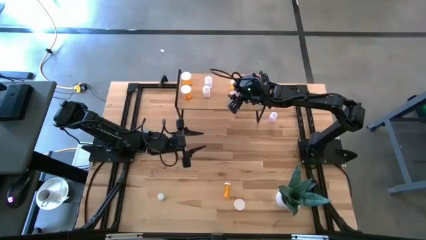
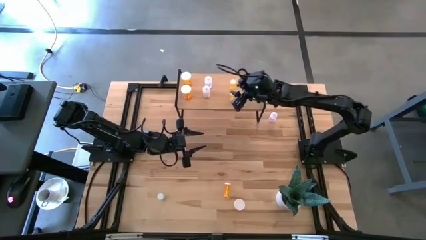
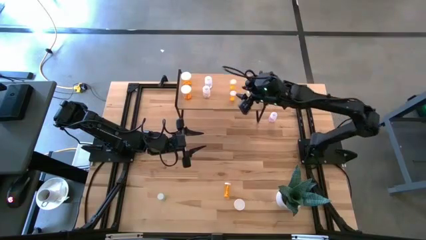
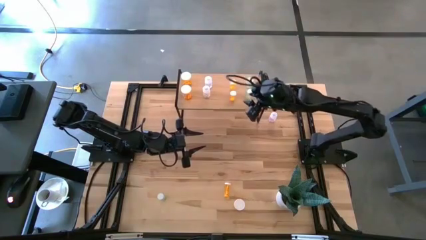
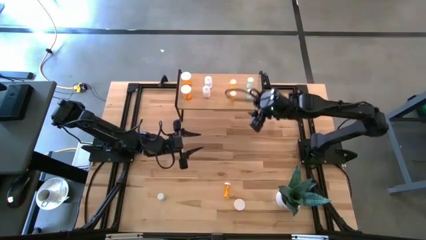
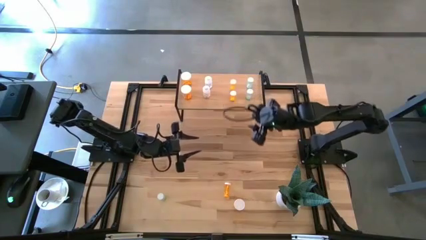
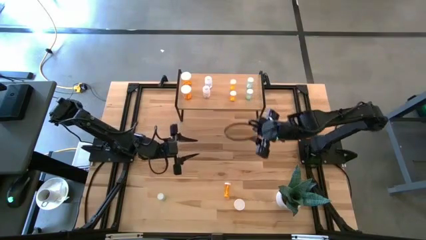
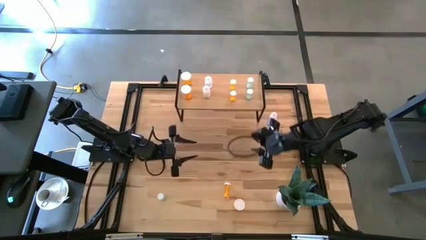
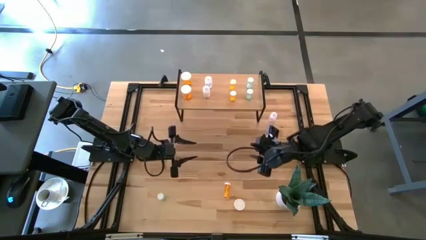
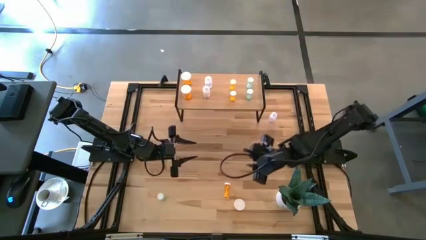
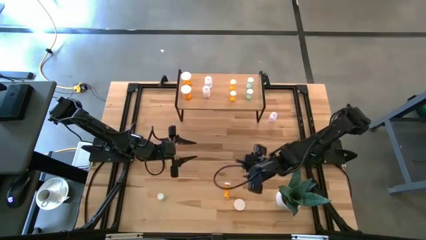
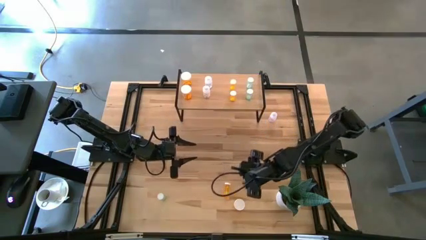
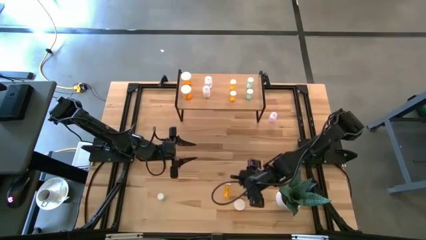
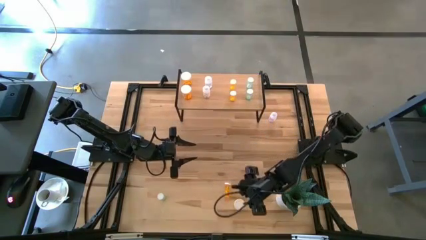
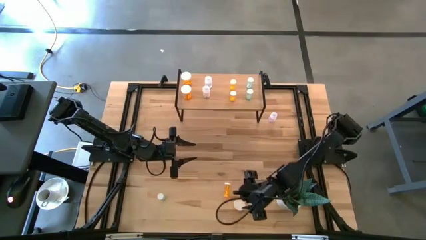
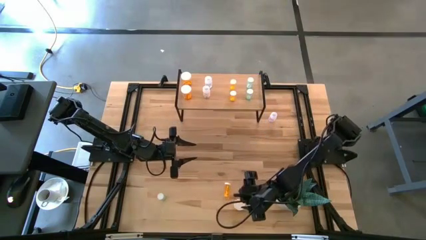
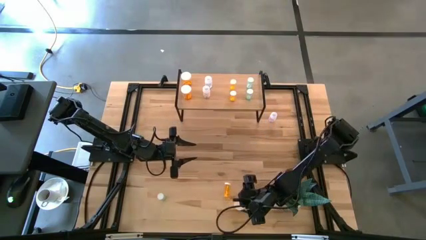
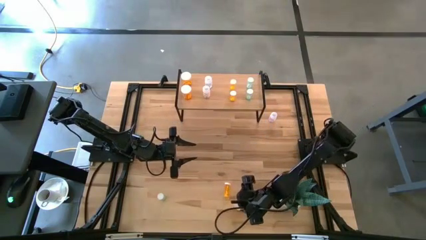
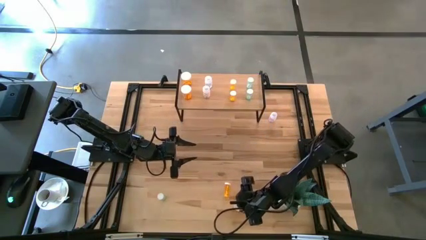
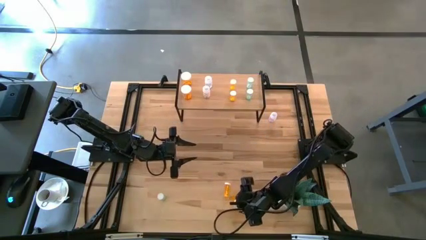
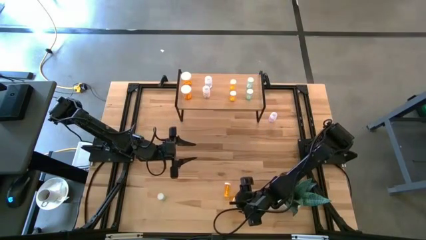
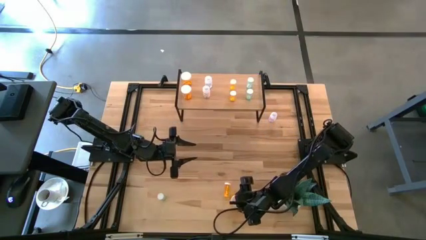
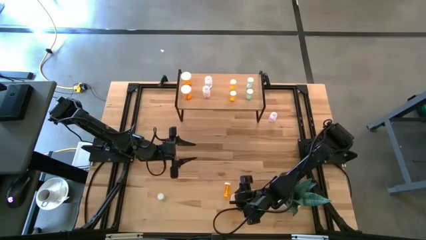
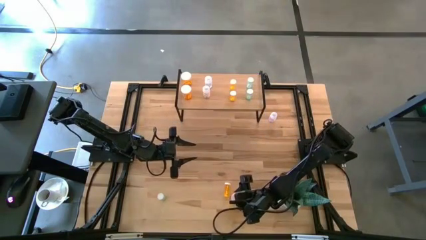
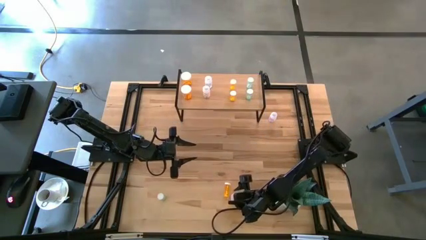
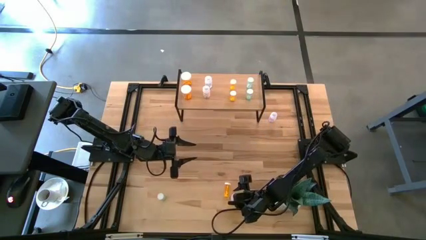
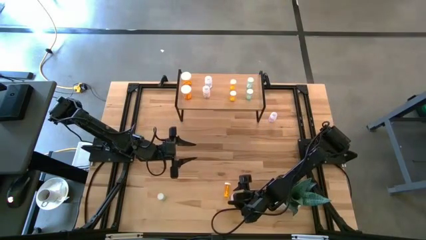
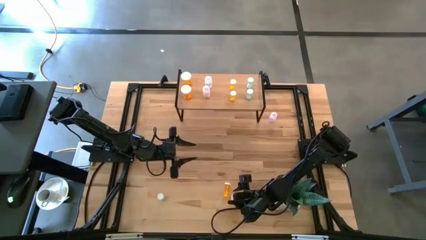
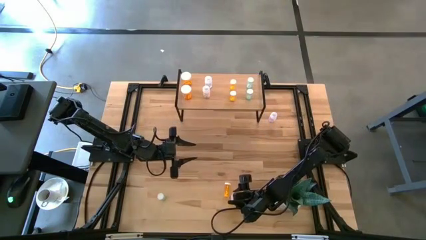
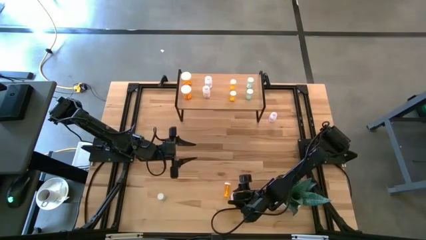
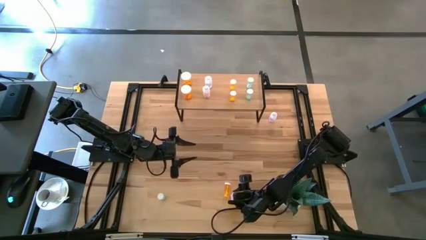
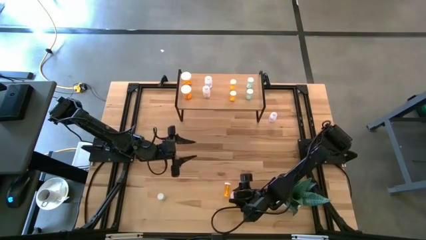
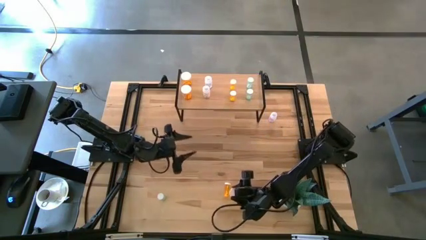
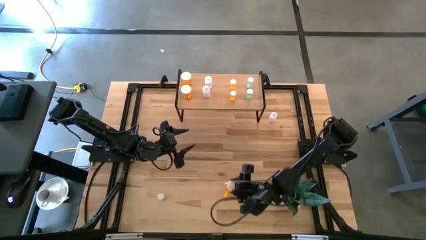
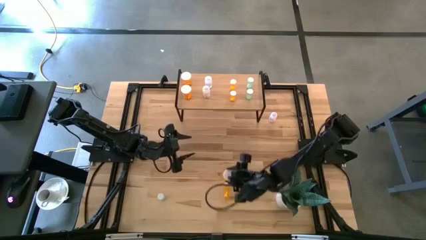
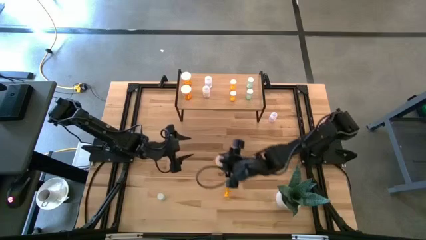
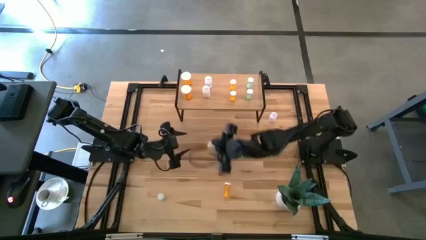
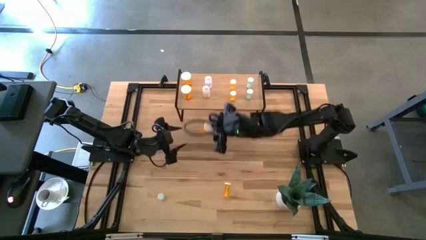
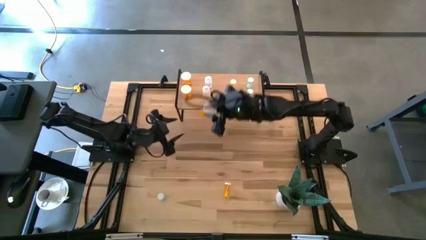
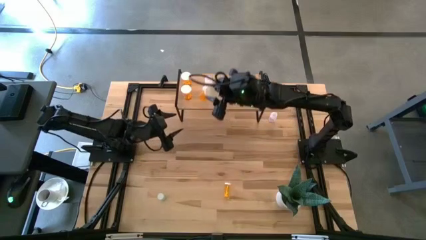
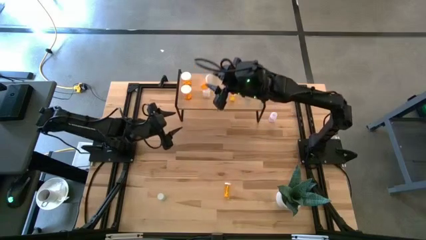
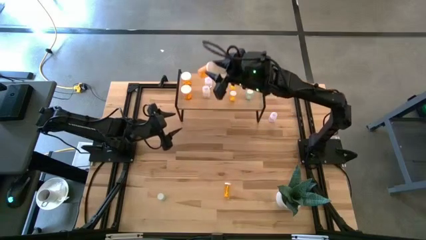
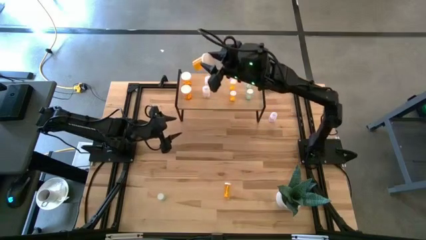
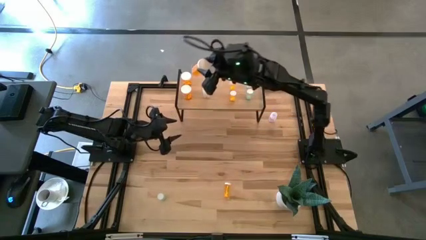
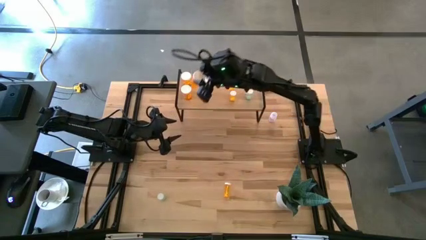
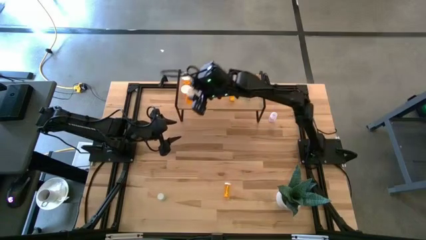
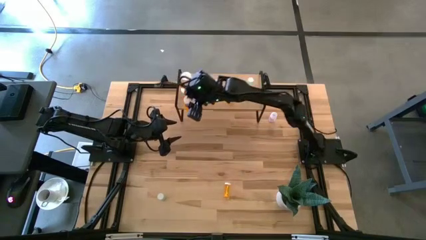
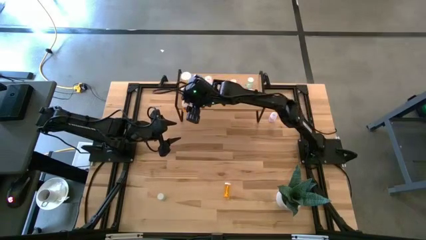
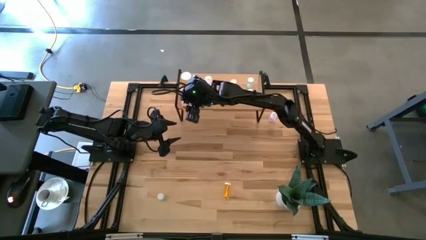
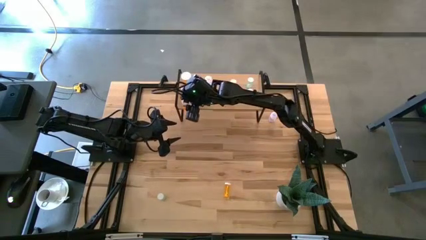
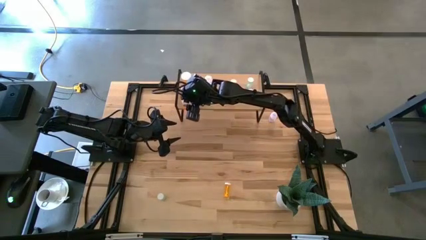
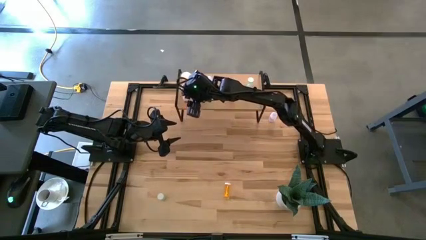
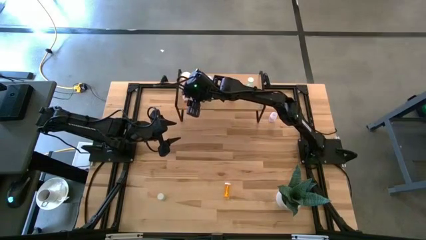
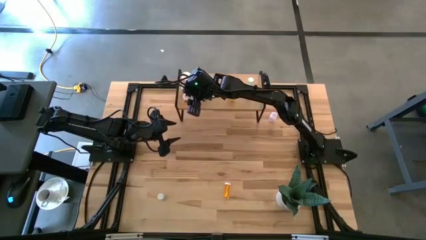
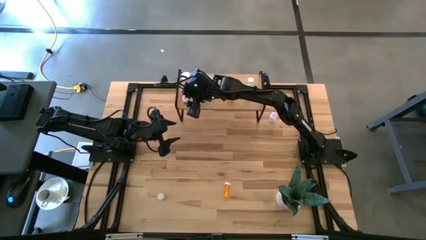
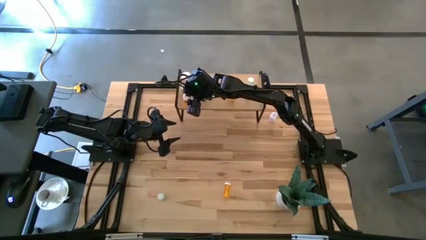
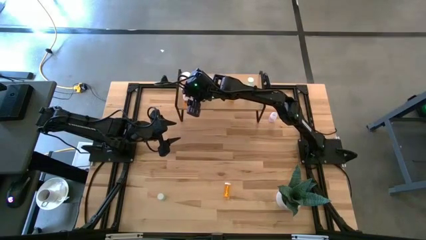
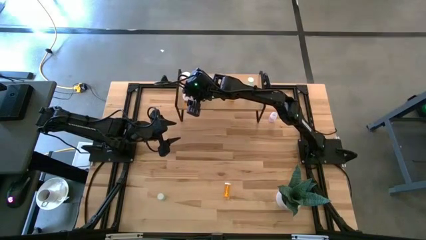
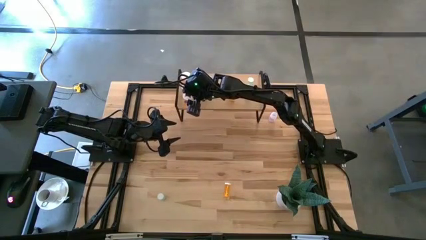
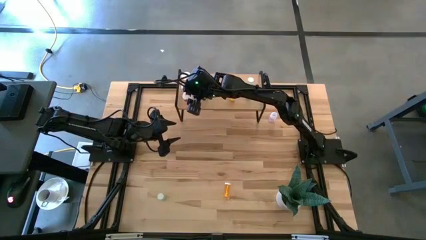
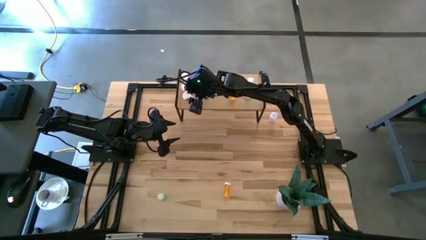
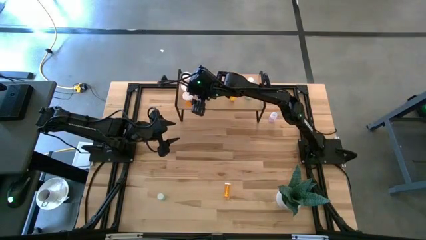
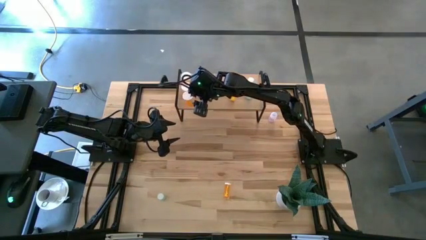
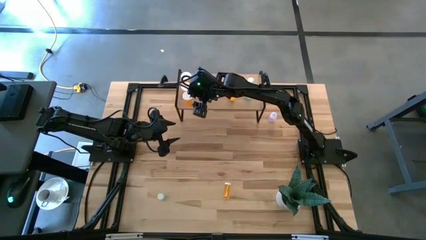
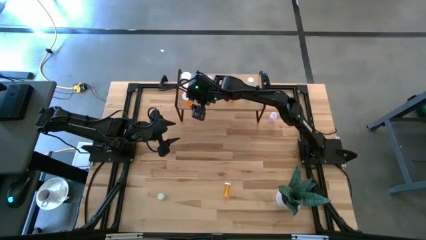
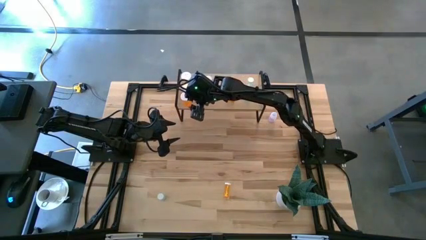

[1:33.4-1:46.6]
Task: Pick and place medicine bottles onto shelf by color
Put the large orange pill bottle on the shelf aligned with the other large orange pill bottle

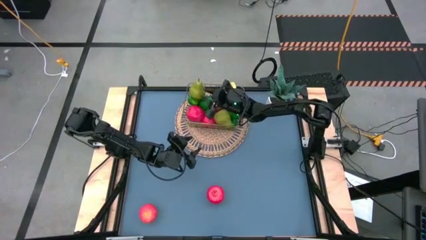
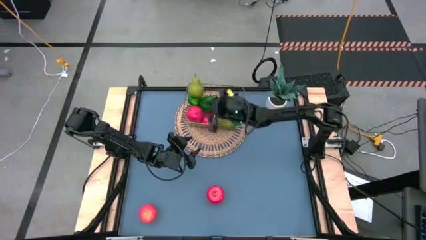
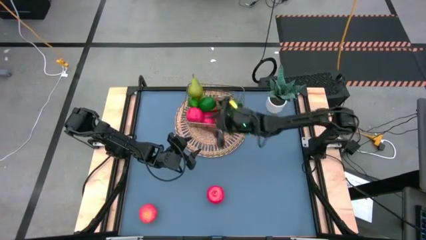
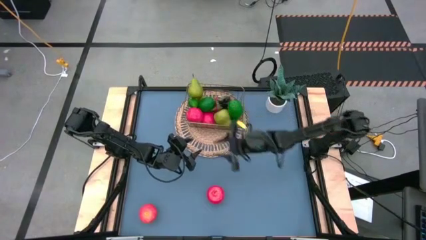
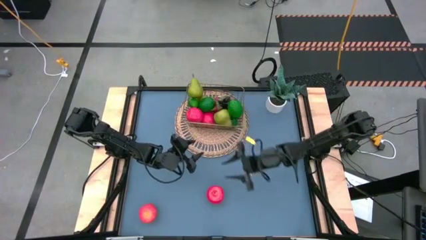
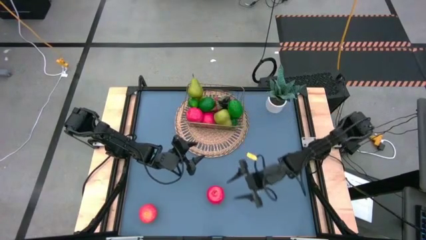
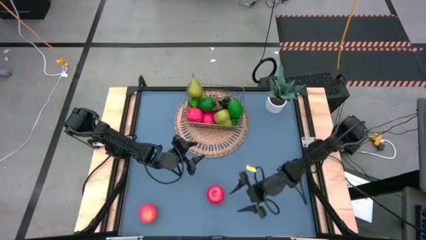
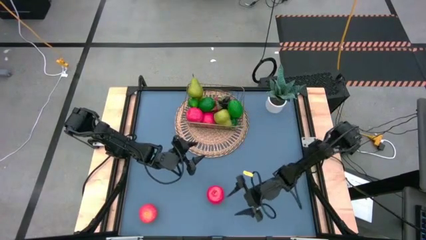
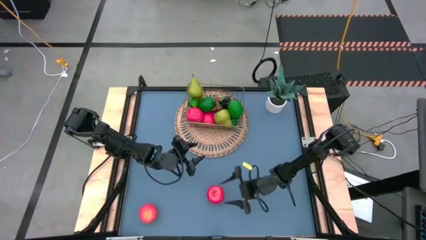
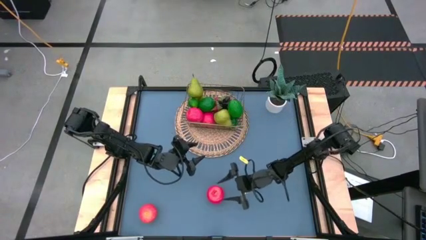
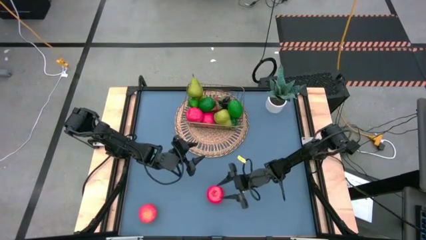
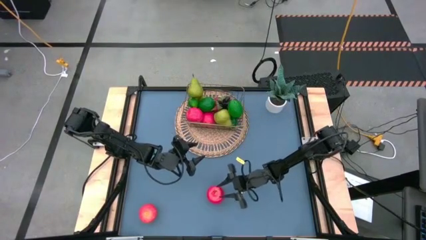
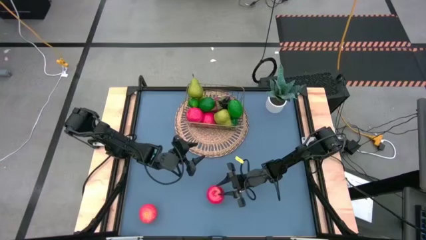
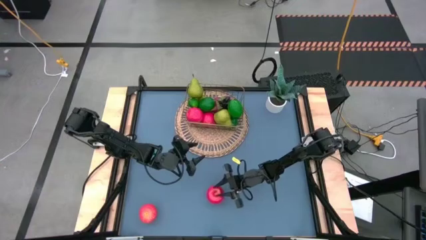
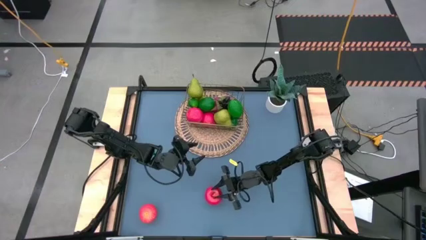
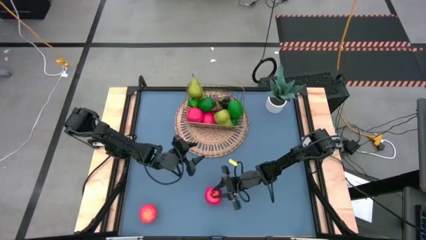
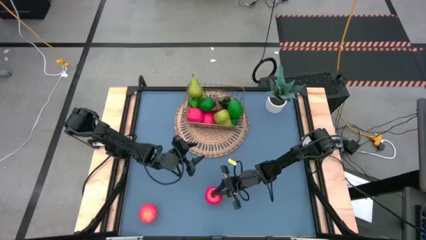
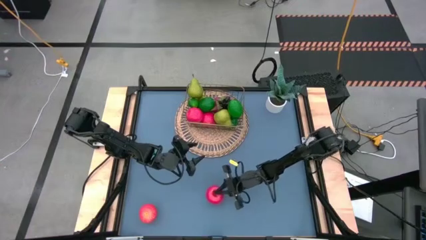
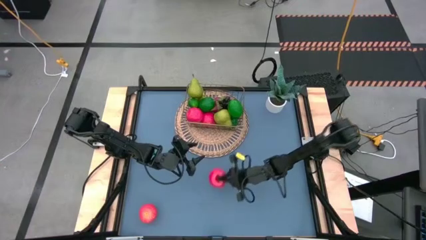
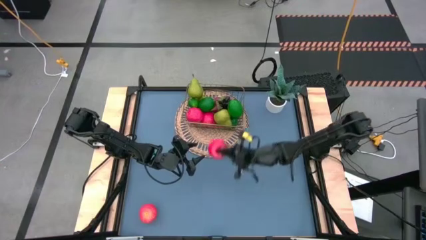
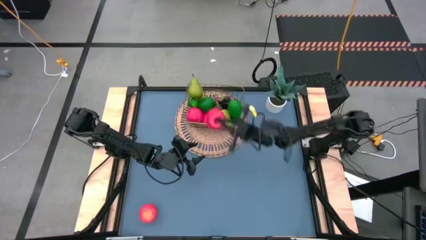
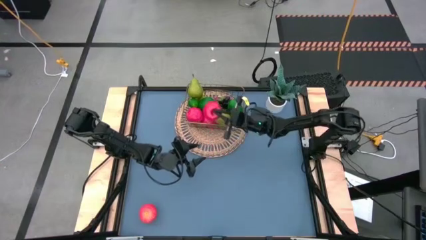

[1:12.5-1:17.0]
Task: Build produce basket
Put the red apple into the gold wire basket
